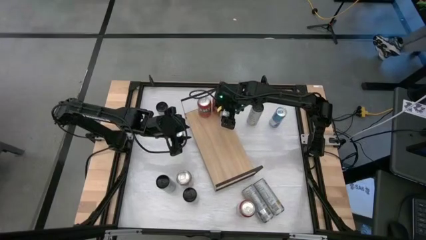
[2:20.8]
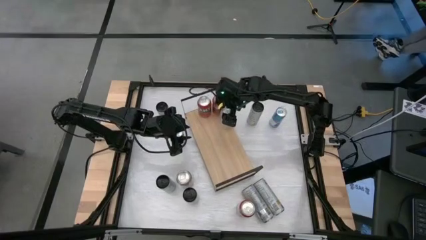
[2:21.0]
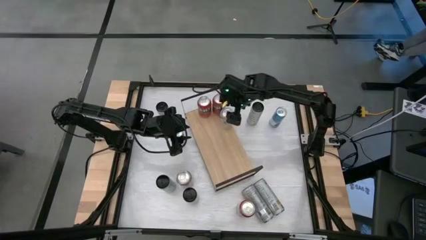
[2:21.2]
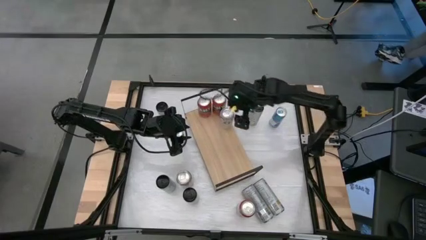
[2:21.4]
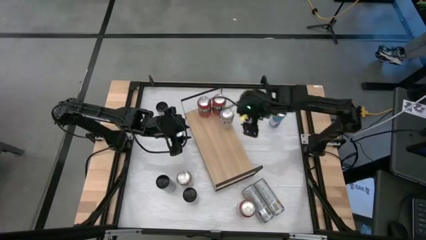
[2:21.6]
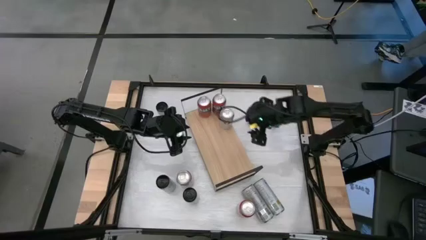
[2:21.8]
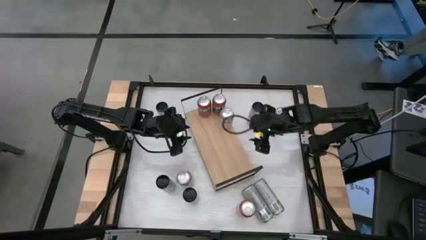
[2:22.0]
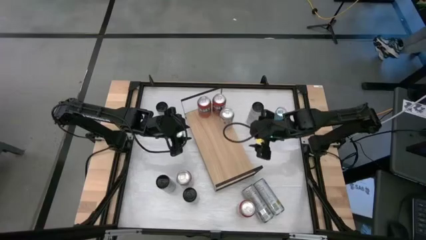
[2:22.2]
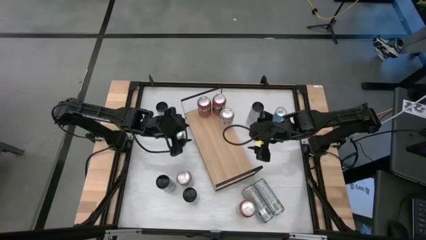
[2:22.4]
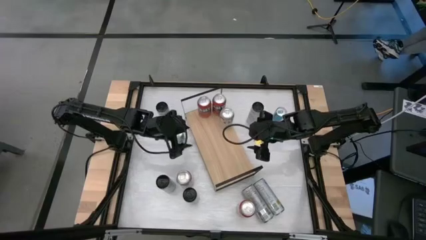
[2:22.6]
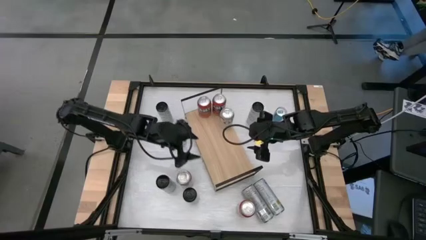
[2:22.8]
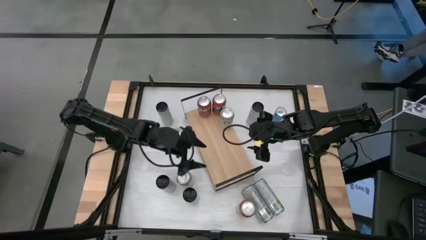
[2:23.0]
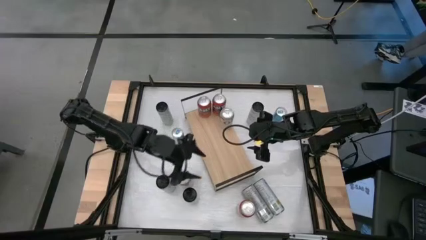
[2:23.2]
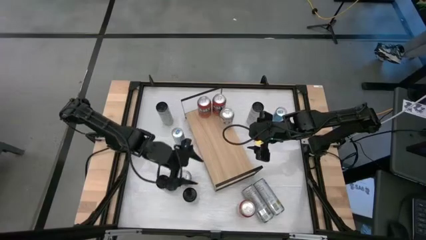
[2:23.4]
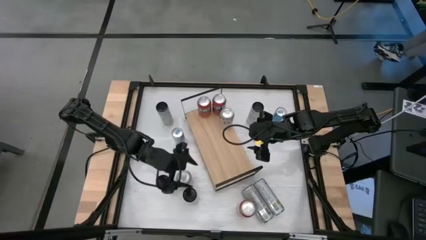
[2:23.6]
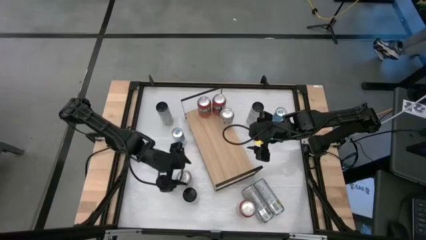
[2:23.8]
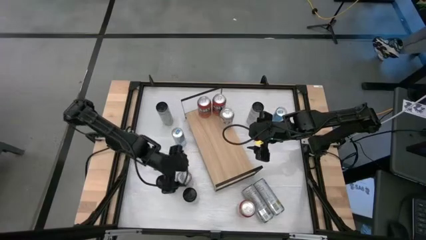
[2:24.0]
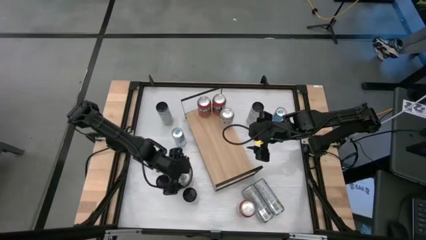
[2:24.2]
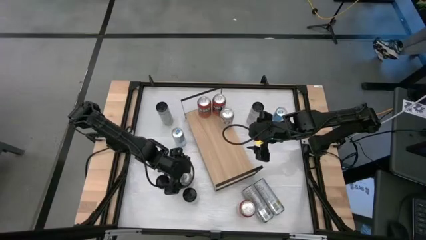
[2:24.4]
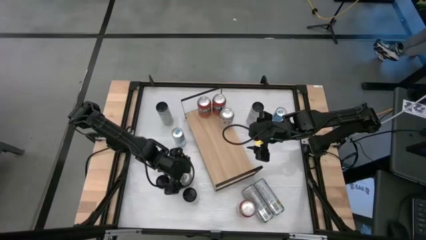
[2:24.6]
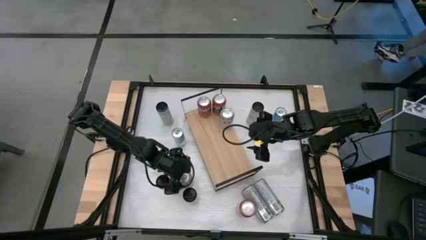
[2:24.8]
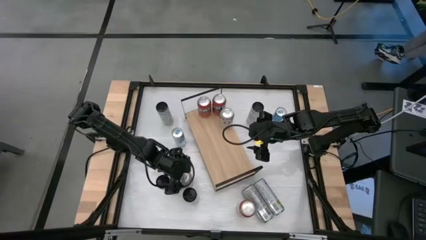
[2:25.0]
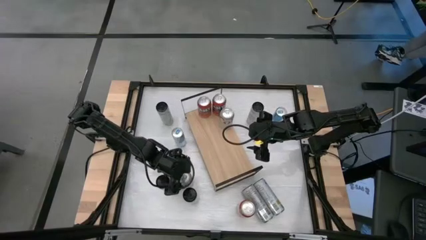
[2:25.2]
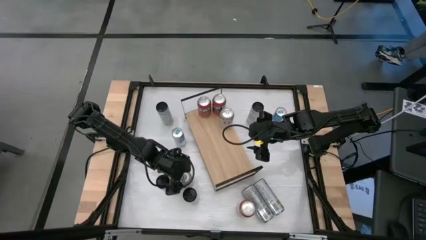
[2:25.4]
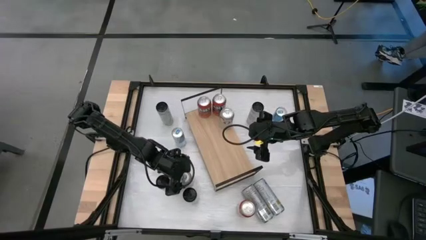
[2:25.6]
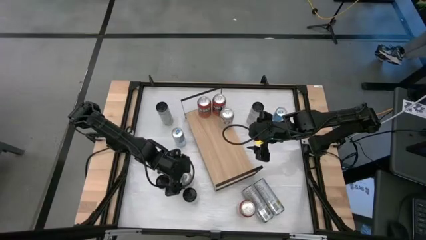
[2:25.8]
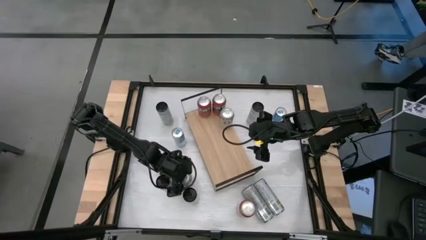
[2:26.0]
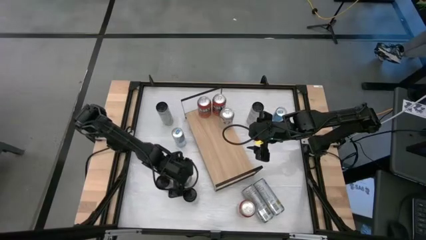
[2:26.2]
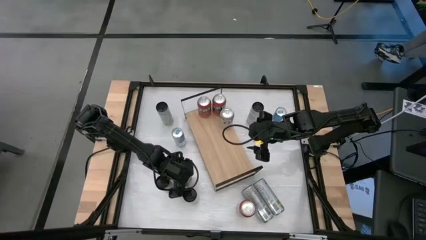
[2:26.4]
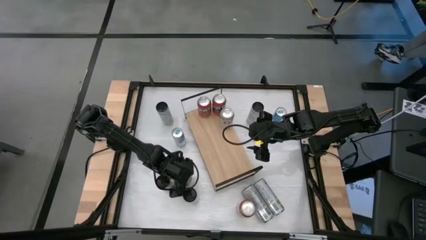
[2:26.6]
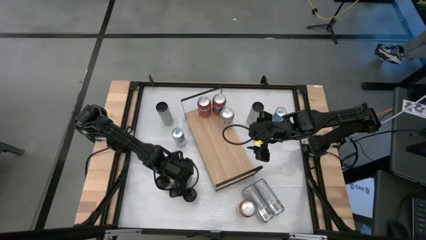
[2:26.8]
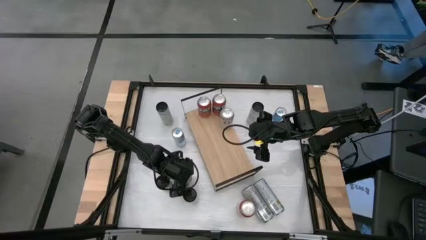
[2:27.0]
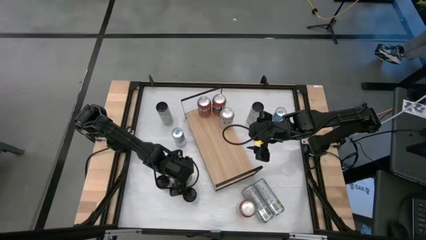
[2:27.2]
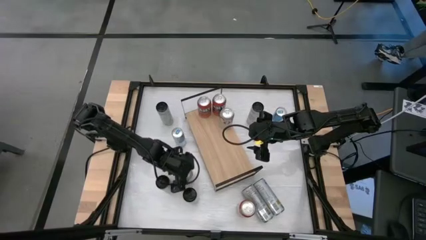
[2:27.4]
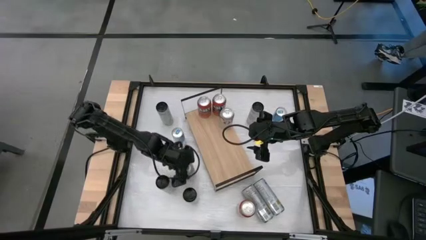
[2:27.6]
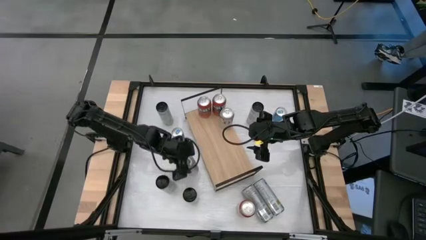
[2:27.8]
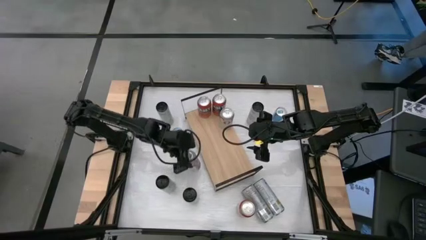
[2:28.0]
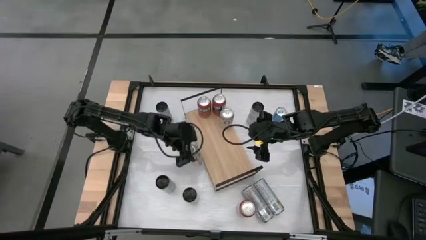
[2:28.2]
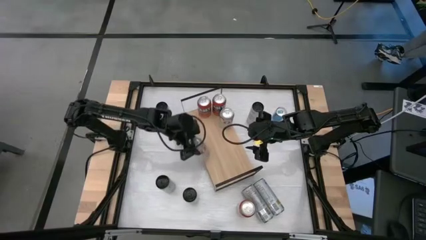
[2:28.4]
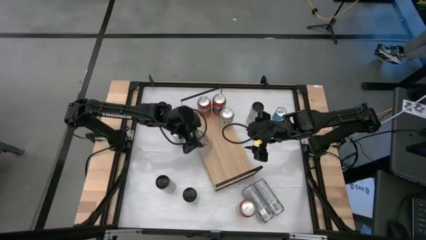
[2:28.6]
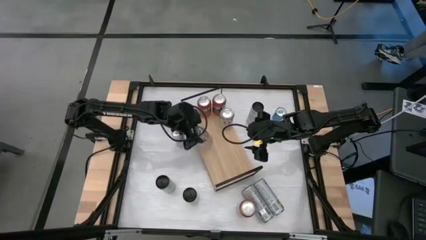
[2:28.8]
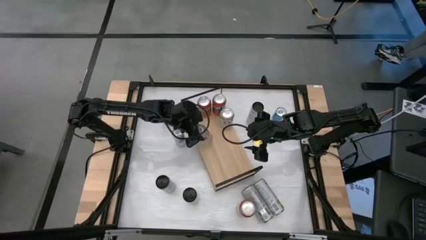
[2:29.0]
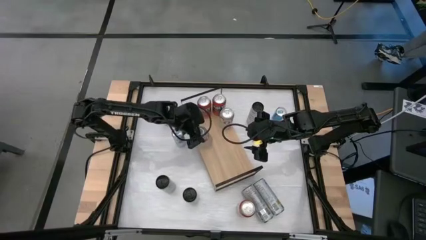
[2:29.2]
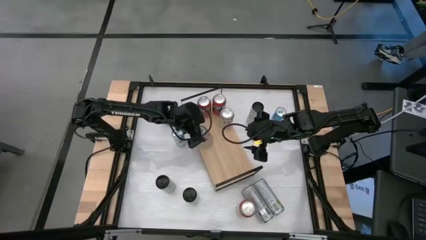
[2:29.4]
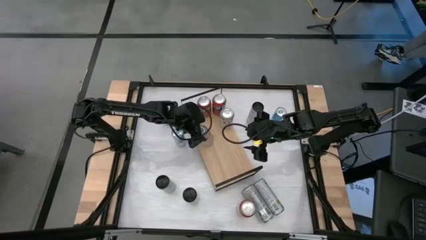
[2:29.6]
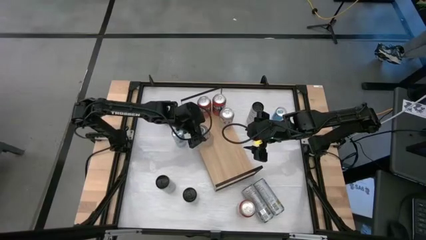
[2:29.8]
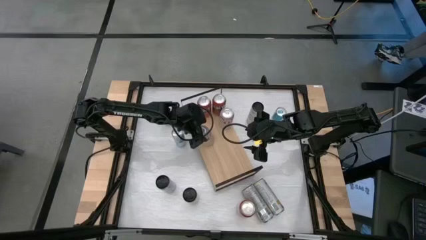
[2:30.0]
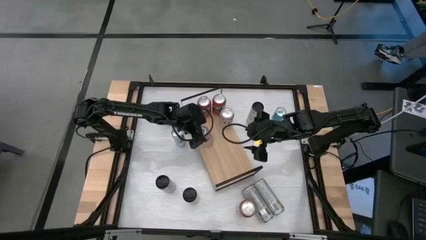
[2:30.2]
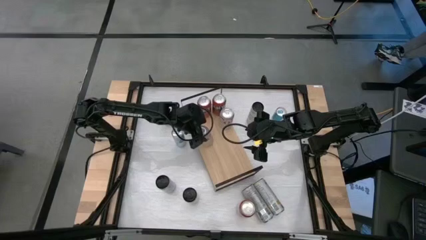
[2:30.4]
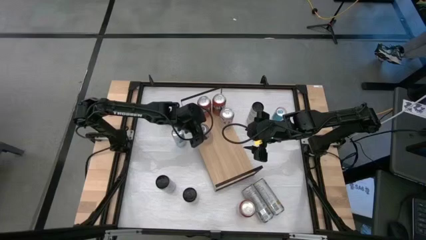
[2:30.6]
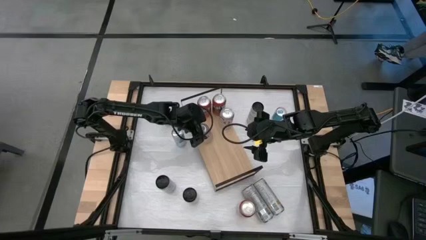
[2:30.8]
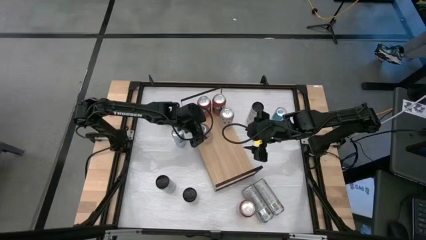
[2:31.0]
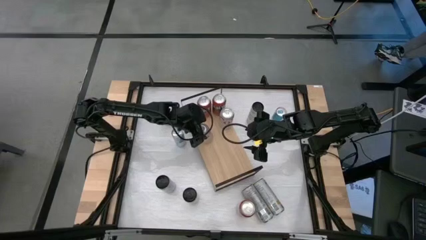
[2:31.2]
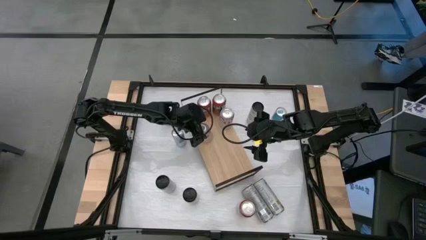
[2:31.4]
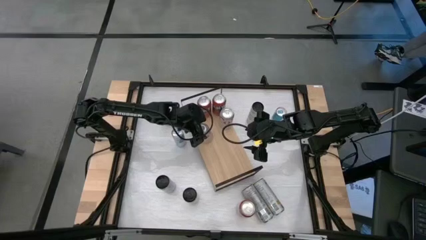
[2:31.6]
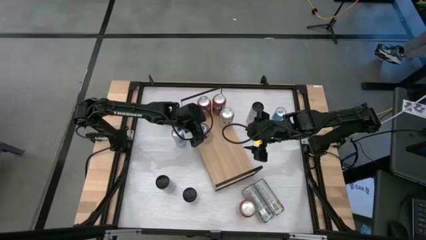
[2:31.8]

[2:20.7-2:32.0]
Task: Place canned beverage on shelf
Align the white soda can with the other white soda can

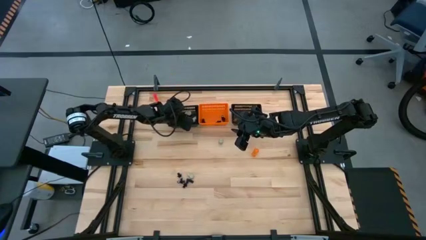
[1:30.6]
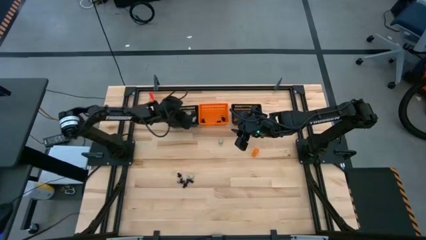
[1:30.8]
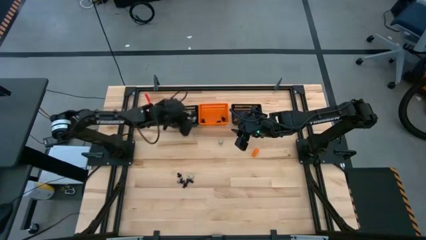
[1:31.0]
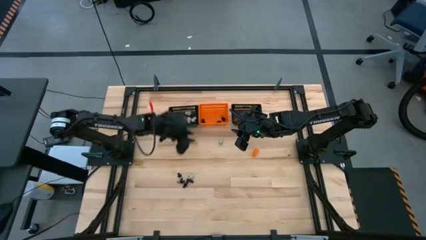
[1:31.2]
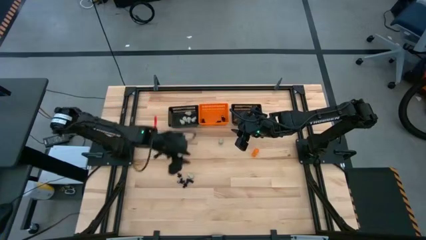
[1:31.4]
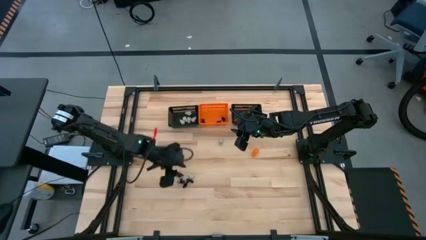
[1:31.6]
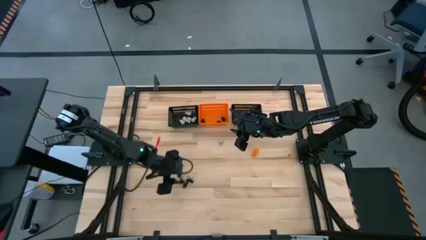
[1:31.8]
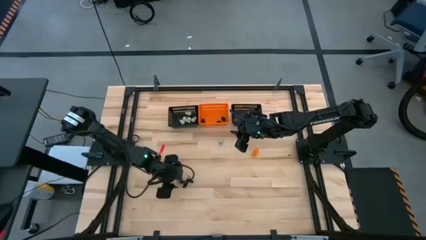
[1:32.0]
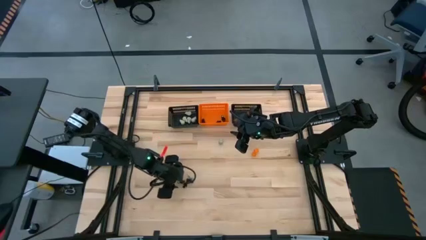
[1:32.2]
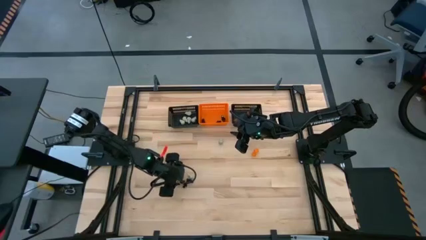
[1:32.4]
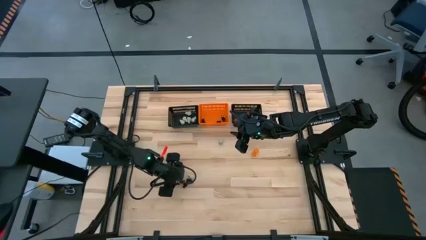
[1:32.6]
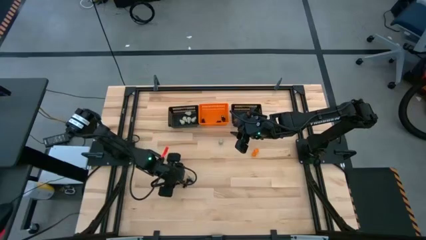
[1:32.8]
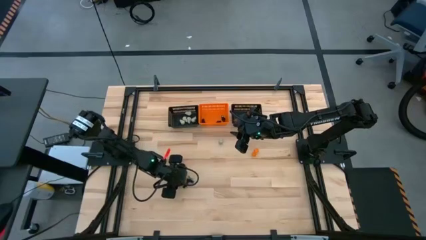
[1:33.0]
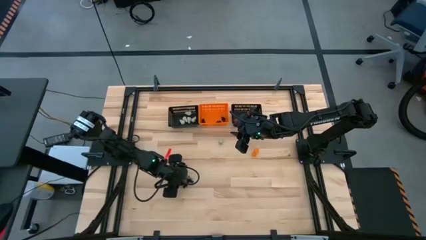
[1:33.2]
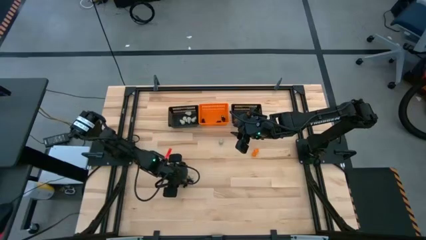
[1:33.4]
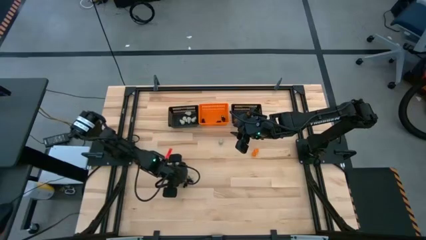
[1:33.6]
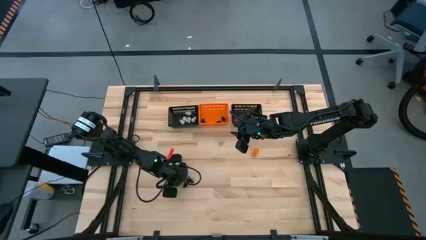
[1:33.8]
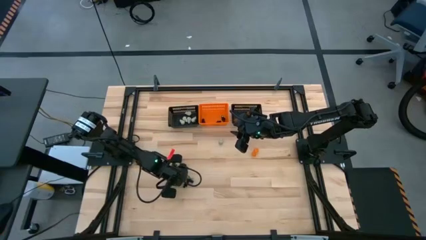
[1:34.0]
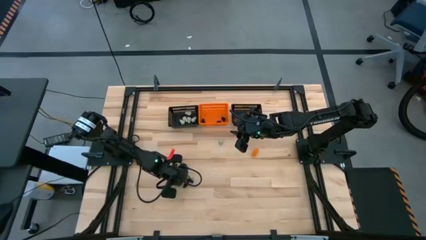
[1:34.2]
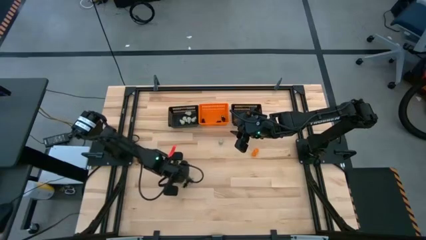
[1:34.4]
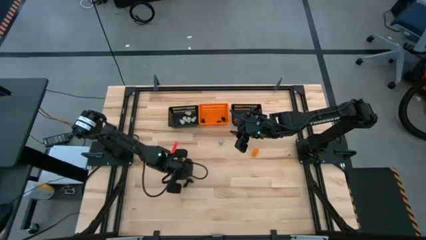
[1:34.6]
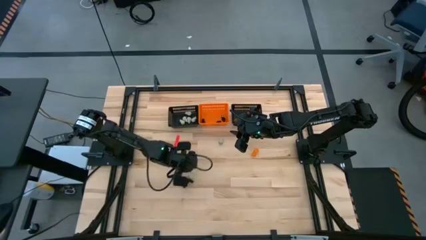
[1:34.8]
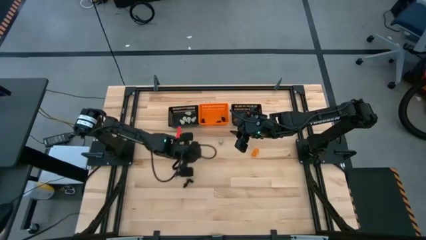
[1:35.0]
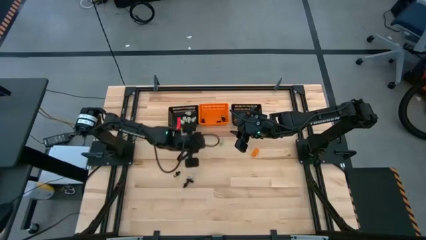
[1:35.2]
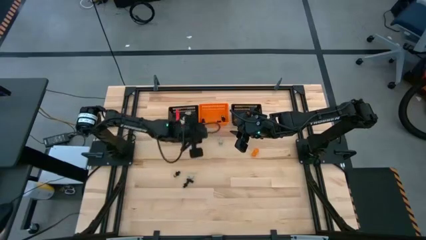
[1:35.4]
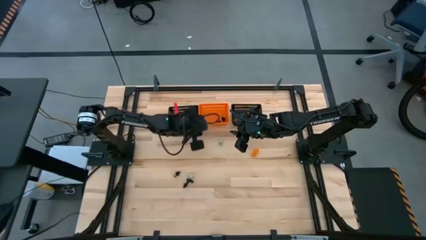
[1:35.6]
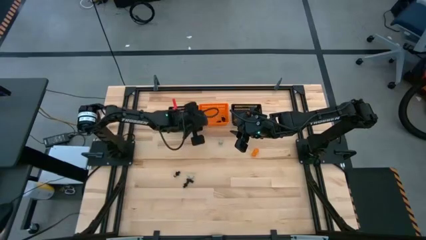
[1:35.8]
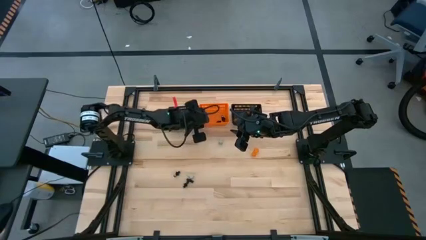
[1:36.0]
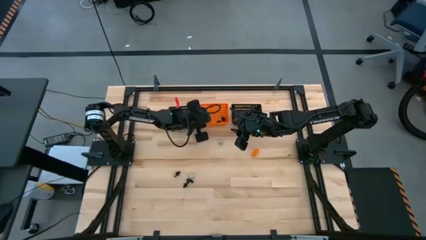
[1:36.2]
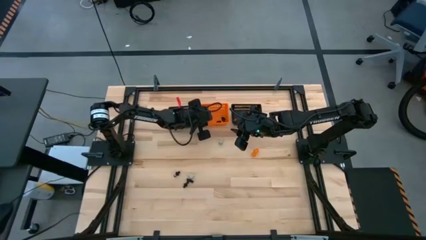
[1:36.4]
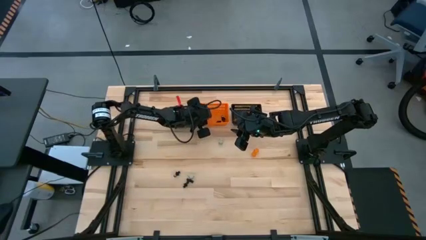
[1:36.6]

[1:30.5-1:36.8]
Task: Sort Halloween decoration
Put the black skeleton toy into the orange bin
